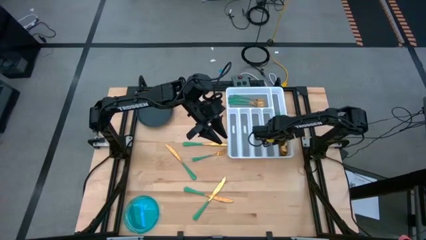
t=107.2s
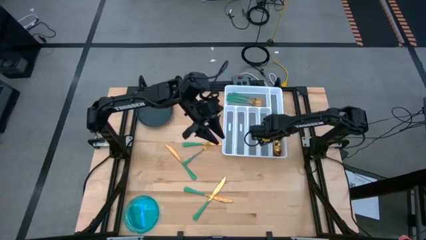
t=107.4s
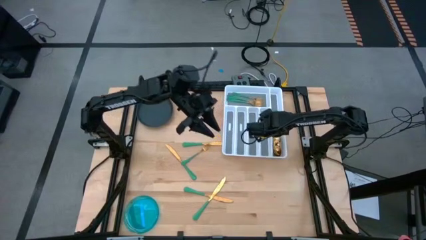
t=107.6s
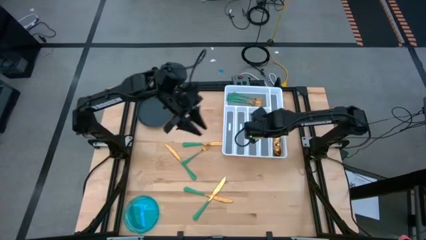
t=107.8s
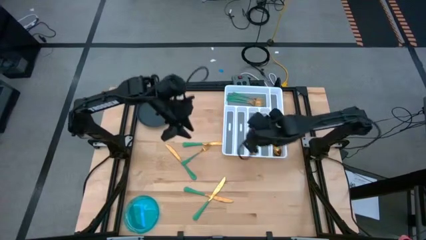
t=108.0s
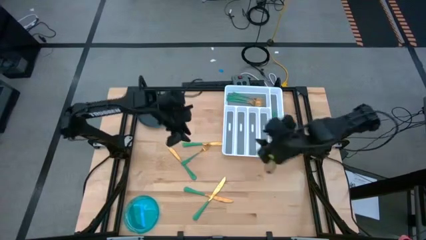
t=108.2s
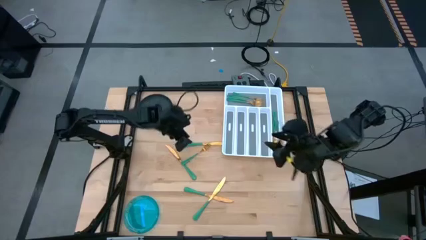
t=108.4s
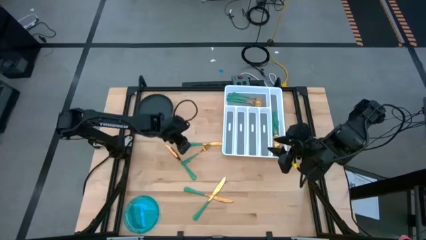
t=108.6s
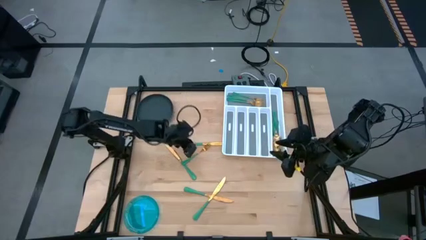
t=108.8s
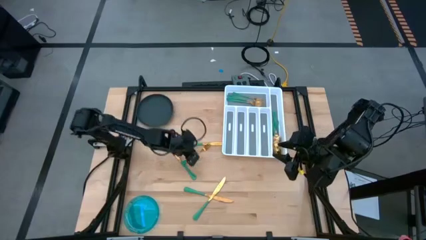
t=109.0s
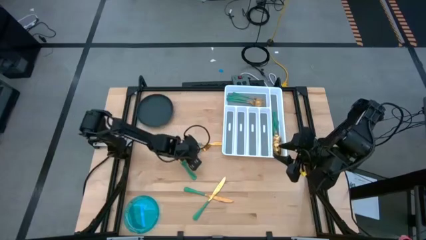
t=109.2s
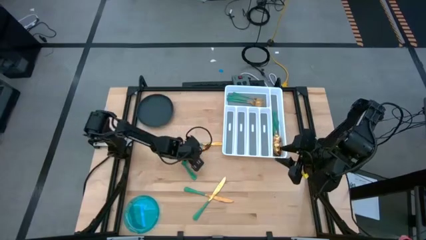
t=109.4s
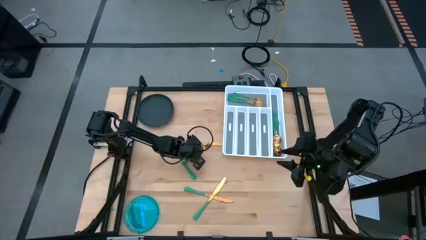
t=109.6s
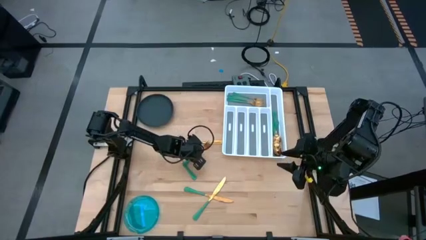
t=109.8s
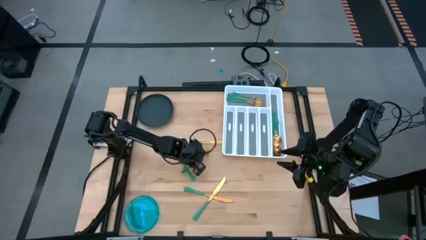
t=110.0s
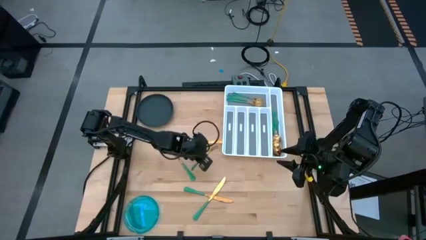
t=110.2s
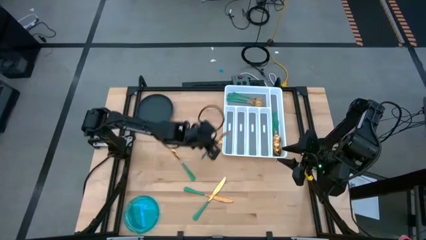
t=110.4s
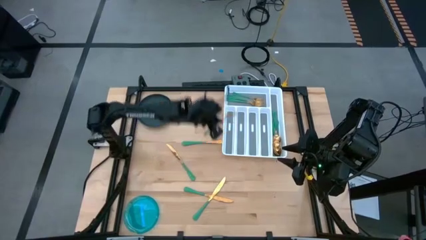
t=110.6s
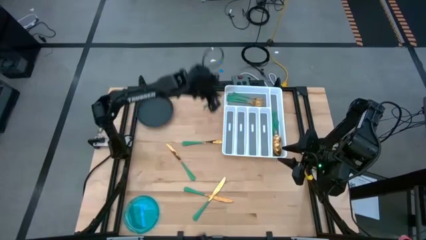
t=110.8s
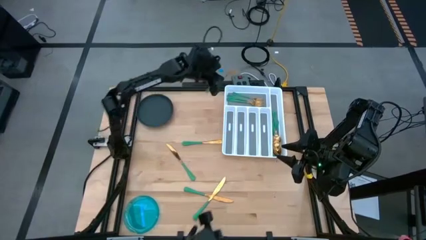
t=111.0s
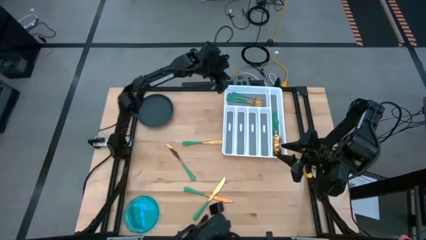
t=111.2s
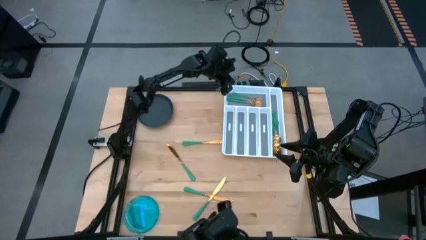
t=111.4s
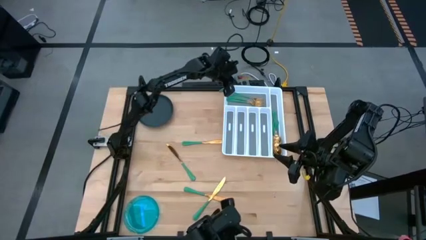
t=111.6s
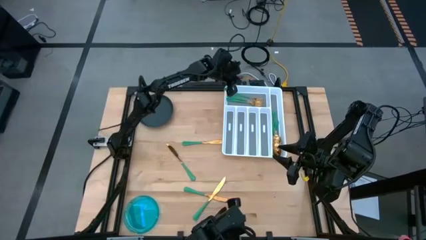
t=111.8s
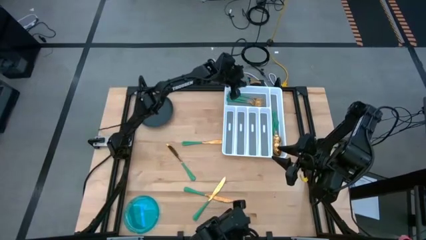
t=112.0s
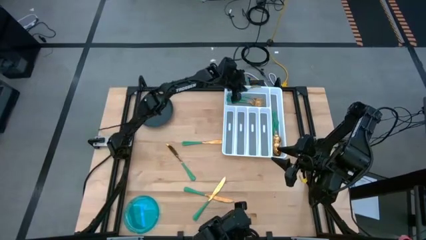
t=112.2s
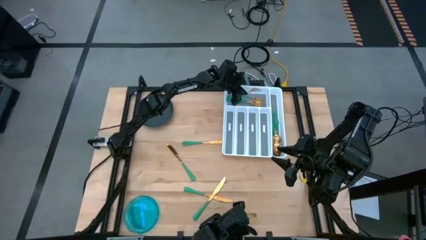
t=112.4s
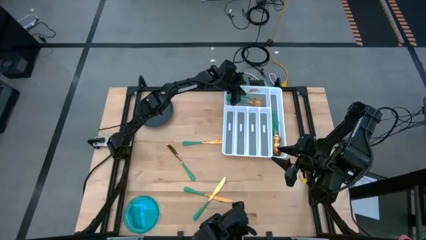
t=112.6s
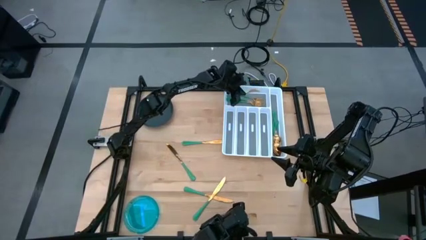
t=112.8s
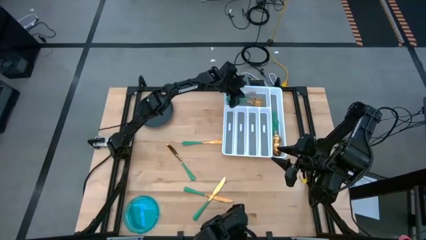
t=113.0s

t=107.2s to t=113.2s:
Task: Sort silverware
Put the green fork into the silverware tray

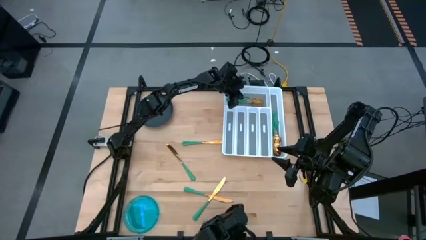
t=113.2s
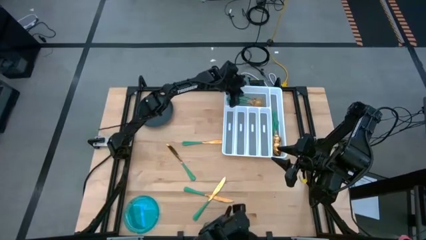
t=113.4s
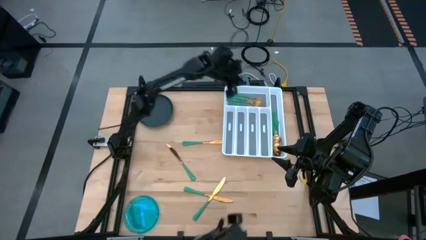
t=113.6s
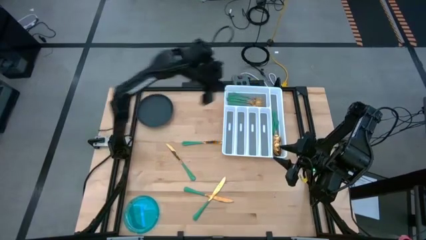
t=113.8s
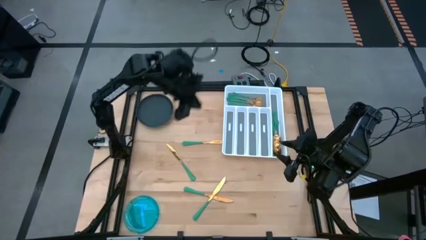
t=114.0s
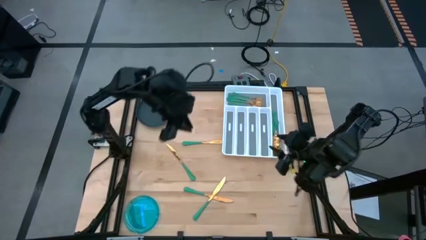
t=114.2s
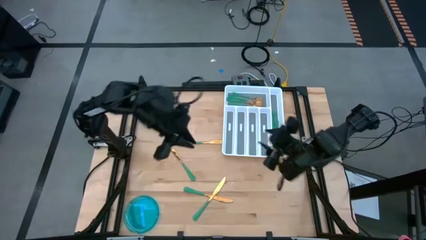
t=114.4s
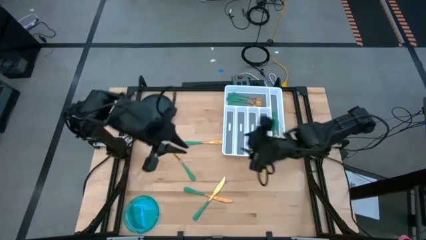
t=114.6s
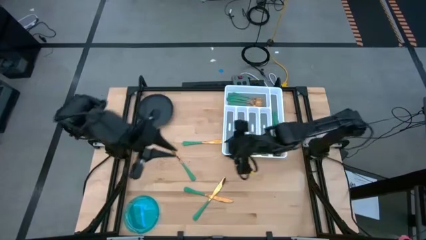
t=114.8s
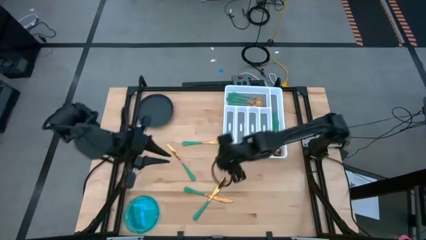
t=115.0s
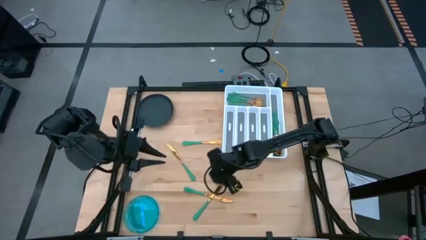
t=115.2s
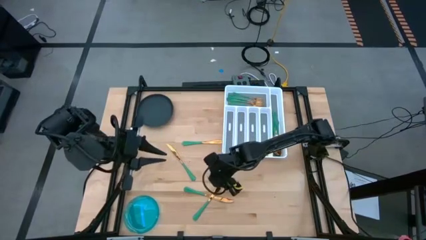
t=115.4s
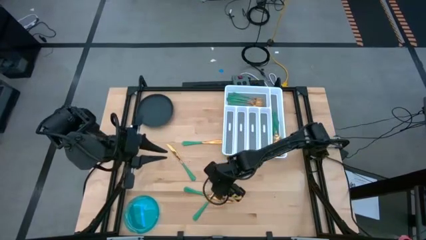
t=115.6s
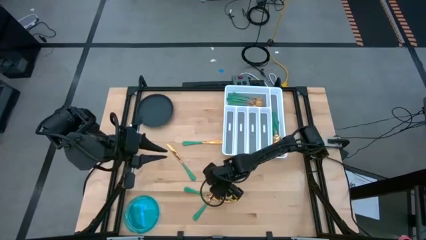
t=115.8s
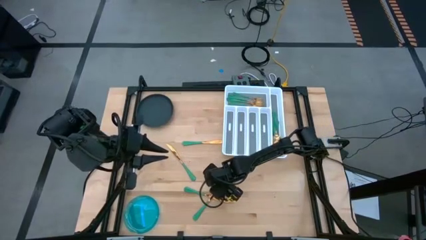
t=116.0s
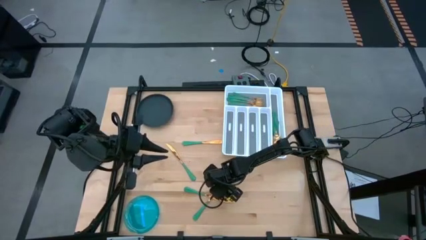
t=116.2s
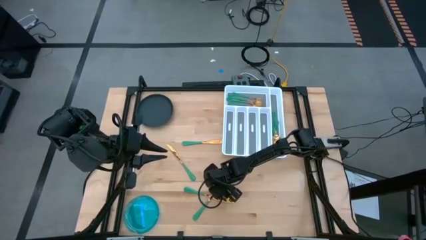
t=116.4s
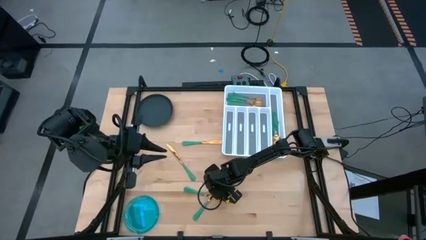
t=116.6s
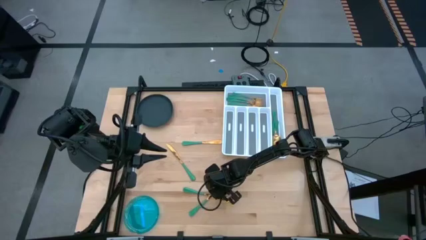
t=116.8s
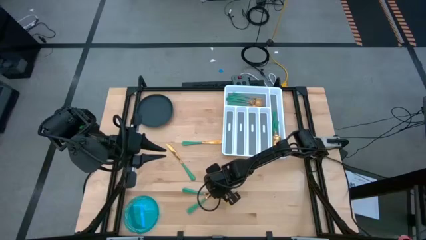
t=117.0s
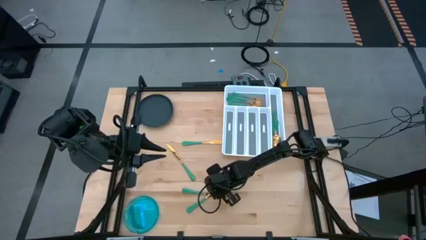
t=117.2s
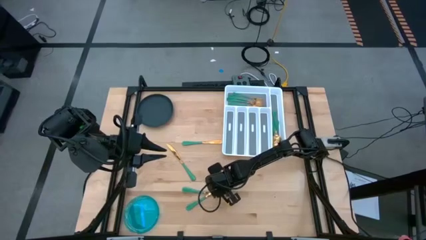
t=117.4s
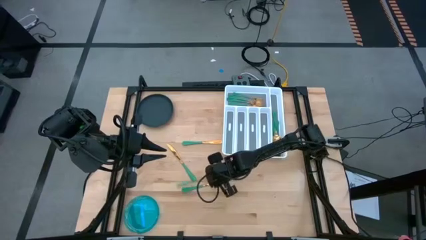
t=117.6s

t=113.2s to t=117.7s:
Put the green knife into the silverware tray

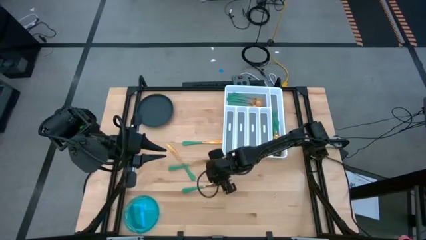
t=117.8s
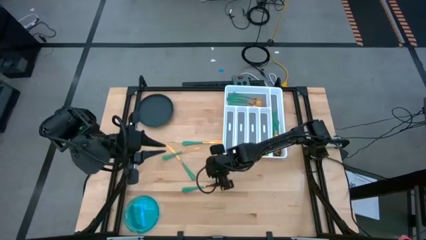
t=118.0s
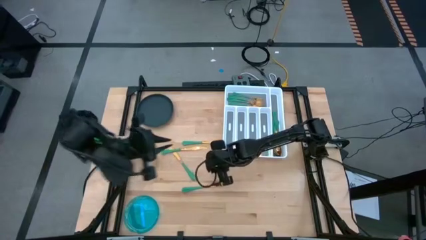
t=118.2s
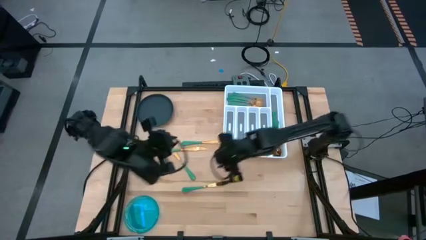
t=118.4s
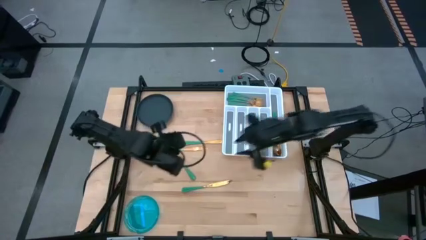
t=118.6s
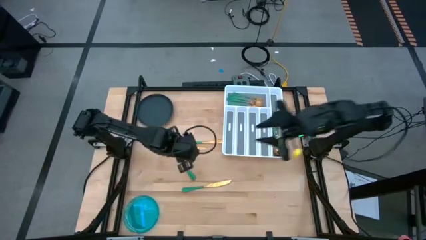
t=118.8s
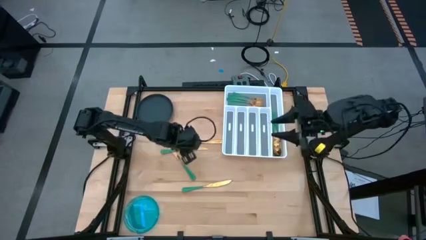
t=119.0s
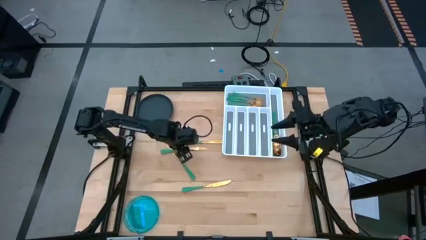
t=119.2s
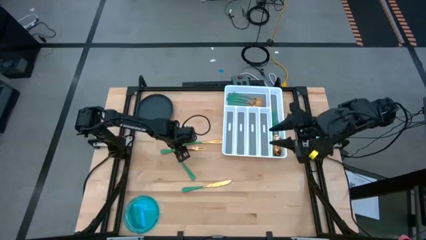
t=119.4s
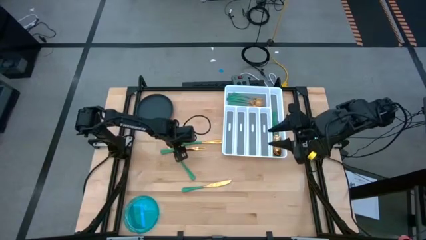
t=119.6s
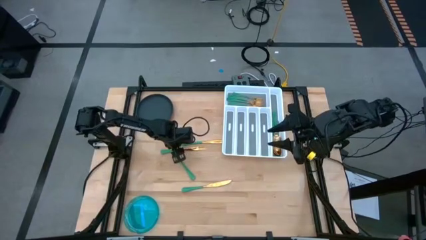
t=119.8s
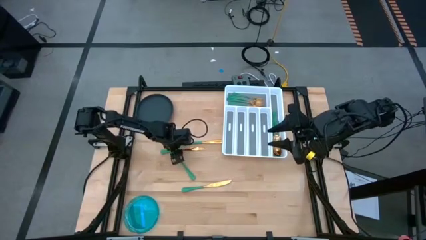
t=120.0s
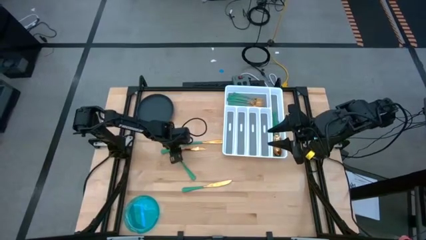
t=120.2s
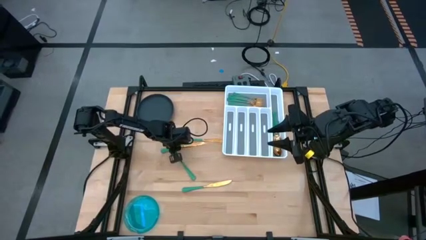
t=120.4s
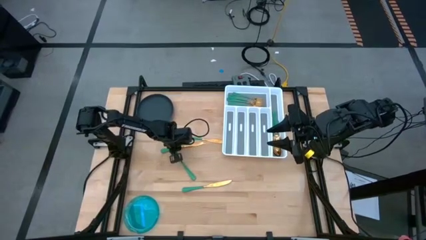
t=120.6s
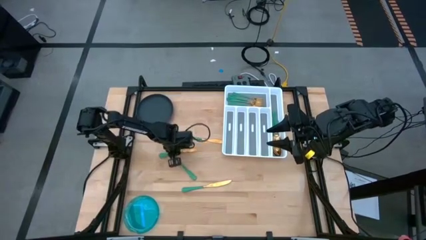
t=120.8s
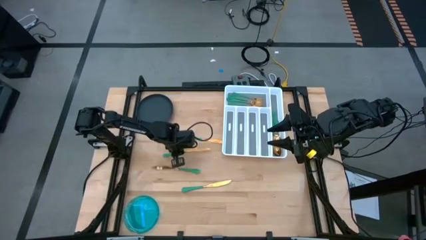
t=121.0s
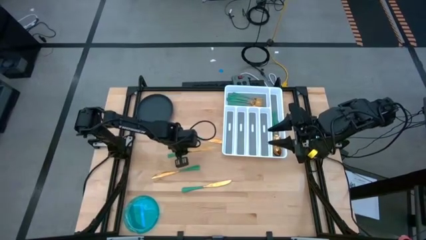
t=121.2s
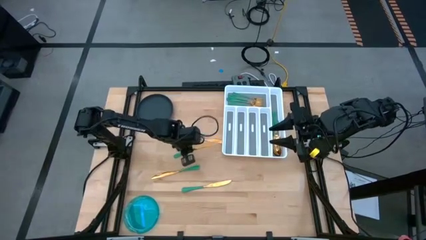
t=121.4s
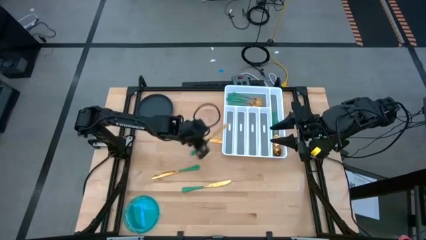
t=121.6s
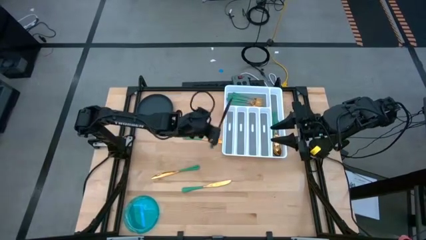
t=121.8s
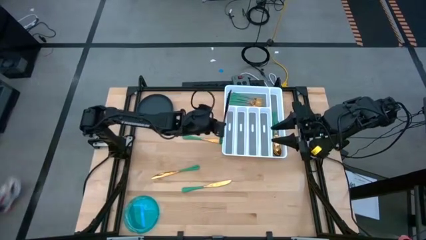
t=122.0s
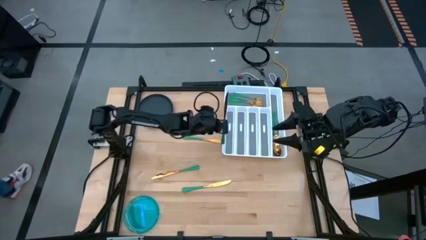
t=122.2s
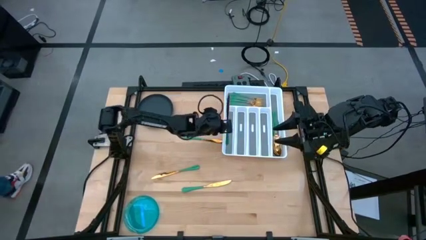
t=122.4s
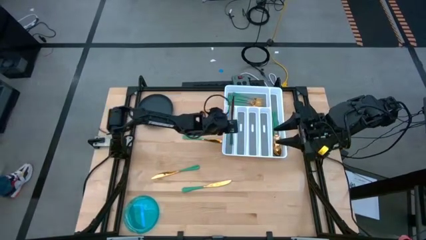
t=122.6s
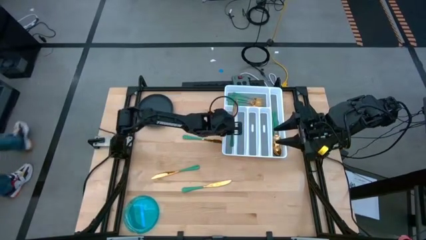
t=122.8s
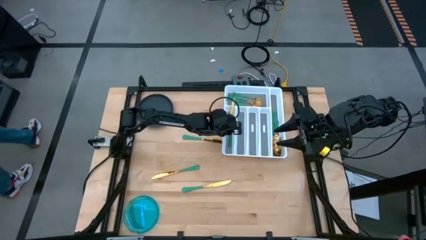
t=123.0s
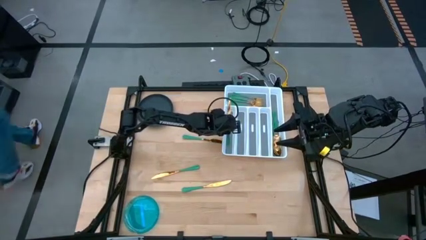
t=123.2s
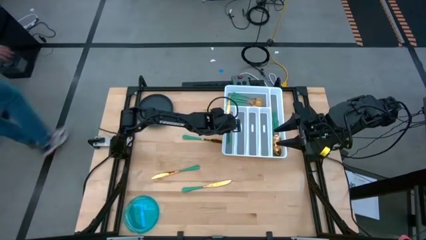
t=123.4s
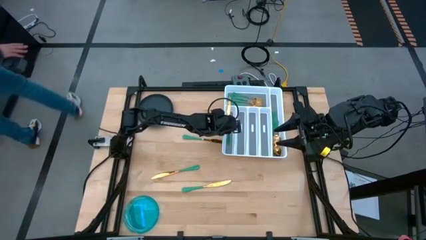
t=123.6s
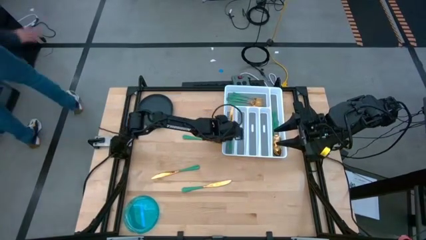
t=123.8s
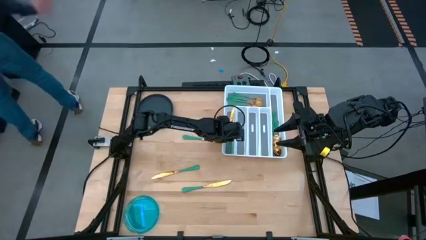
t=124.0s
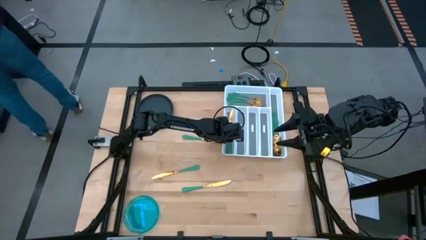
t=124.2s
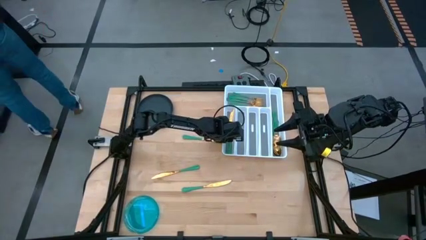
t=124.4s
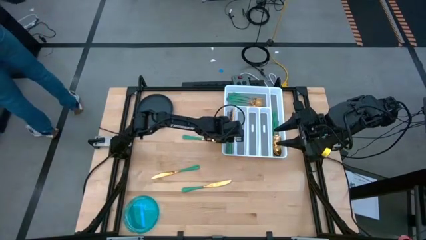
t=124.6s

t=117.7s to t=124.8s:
Put the green knife into the silverware tray
